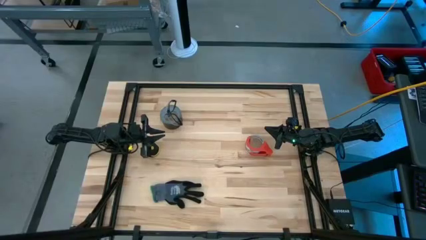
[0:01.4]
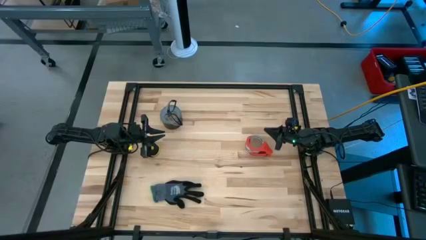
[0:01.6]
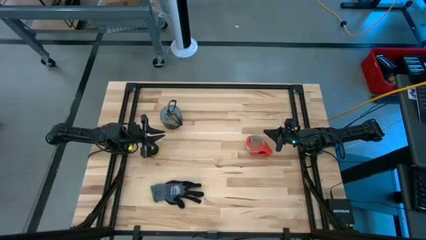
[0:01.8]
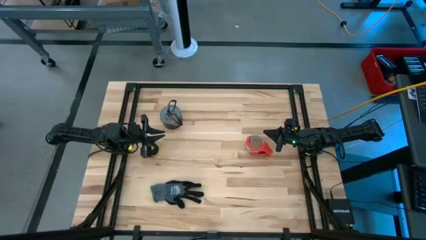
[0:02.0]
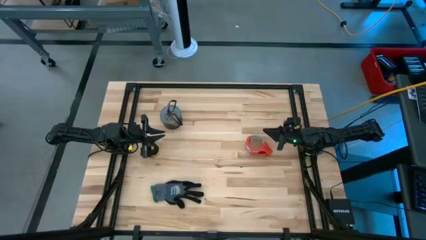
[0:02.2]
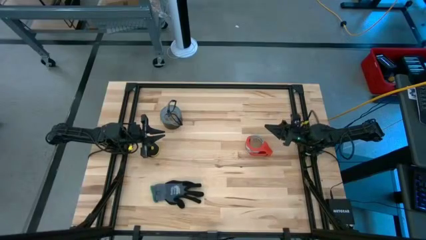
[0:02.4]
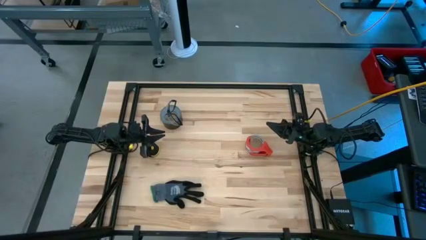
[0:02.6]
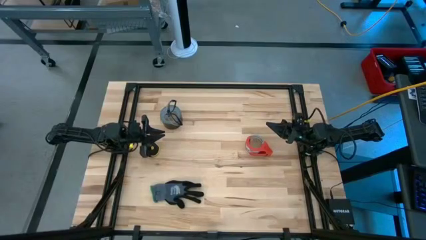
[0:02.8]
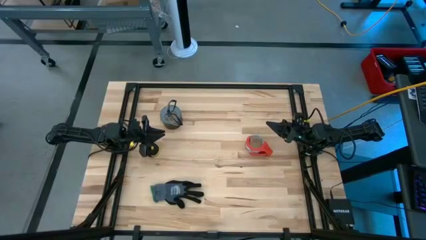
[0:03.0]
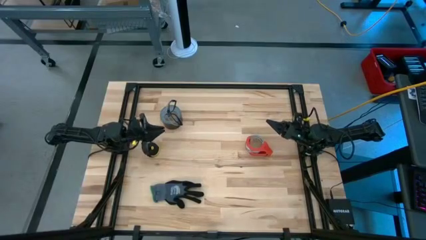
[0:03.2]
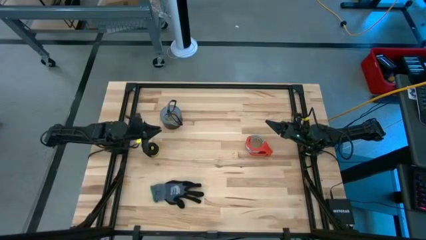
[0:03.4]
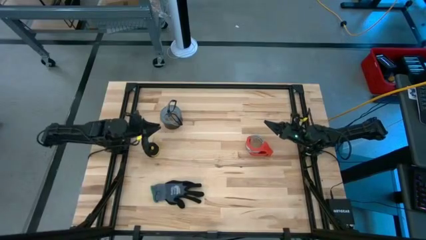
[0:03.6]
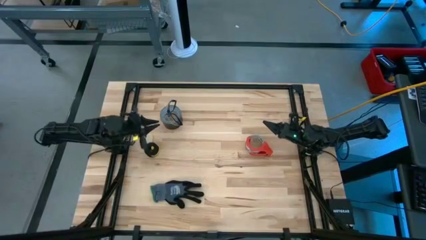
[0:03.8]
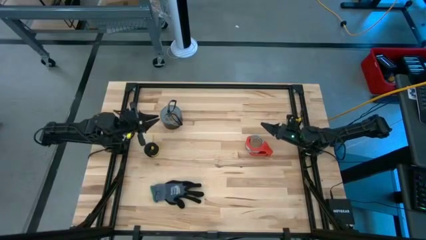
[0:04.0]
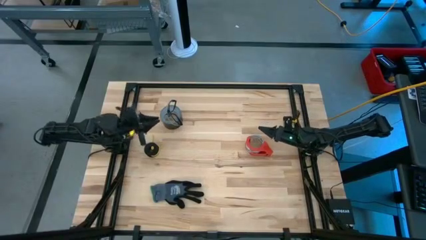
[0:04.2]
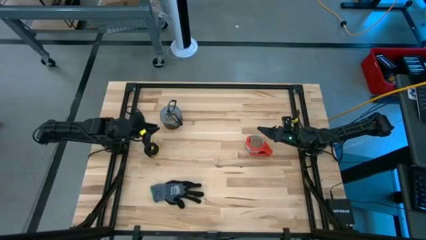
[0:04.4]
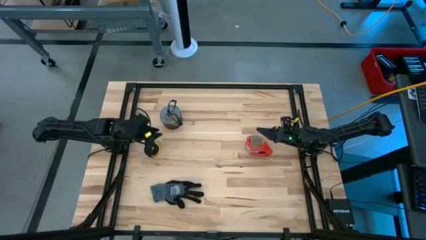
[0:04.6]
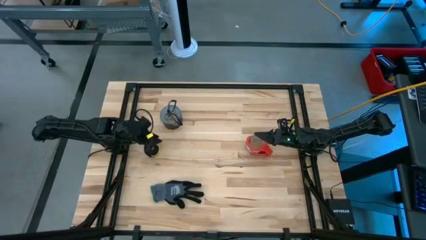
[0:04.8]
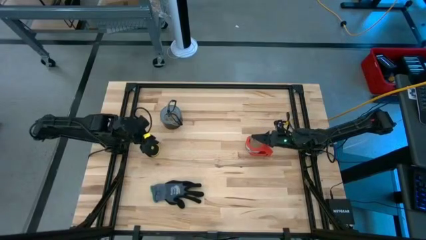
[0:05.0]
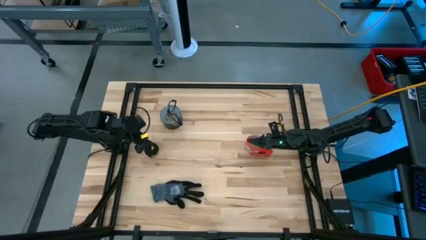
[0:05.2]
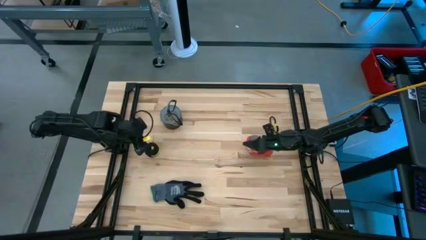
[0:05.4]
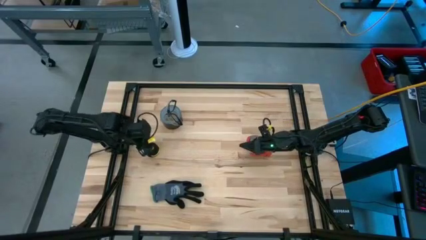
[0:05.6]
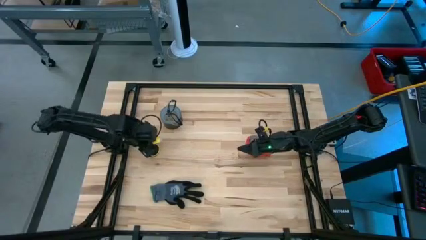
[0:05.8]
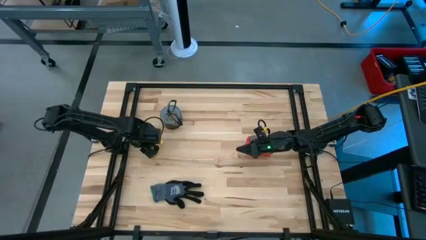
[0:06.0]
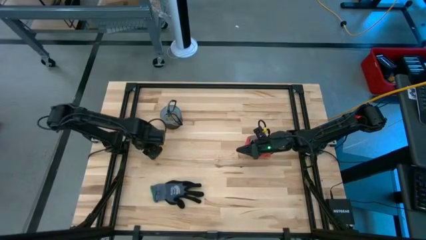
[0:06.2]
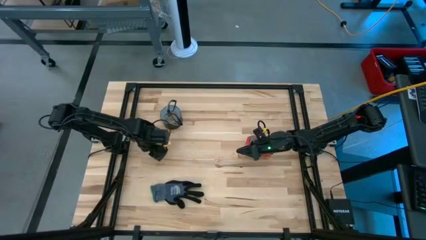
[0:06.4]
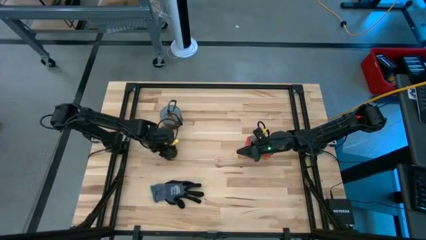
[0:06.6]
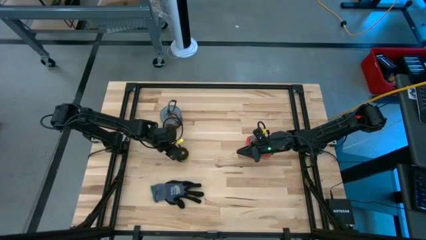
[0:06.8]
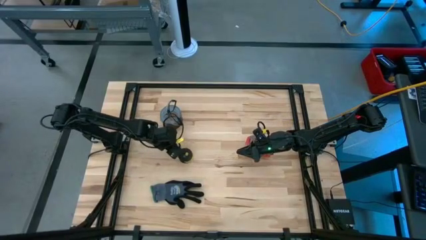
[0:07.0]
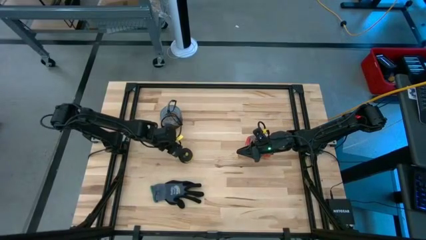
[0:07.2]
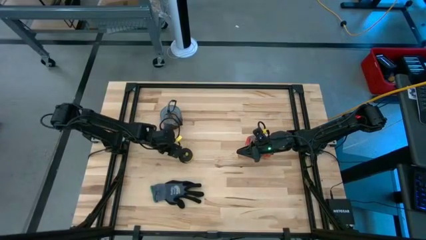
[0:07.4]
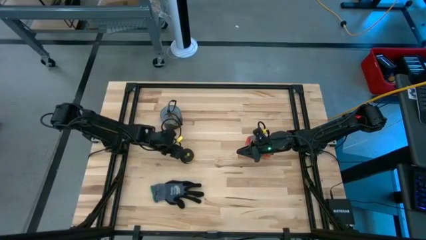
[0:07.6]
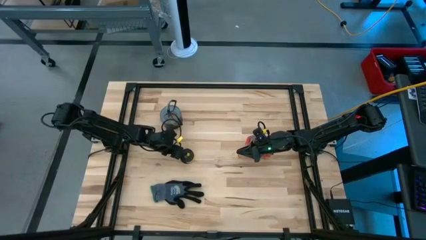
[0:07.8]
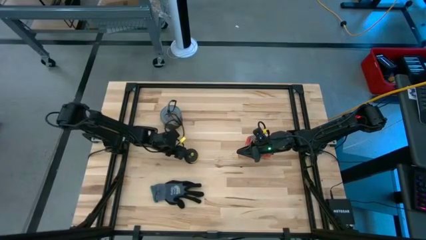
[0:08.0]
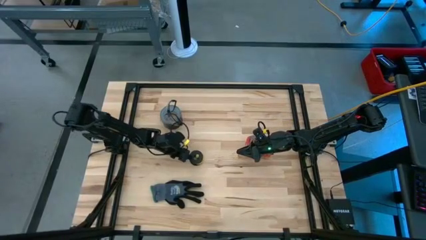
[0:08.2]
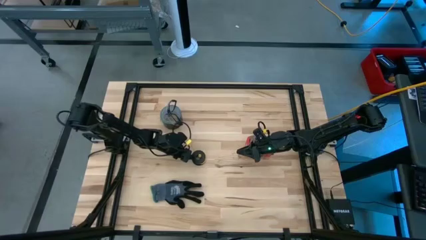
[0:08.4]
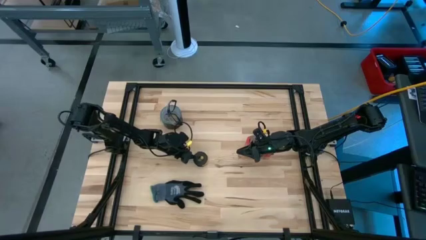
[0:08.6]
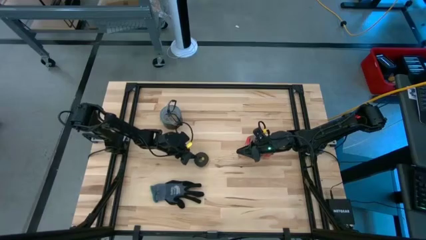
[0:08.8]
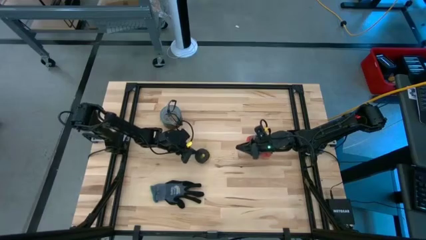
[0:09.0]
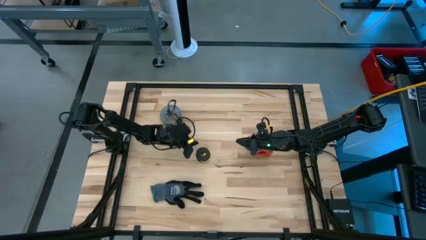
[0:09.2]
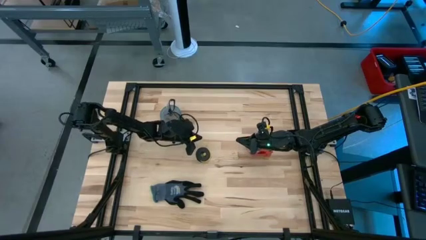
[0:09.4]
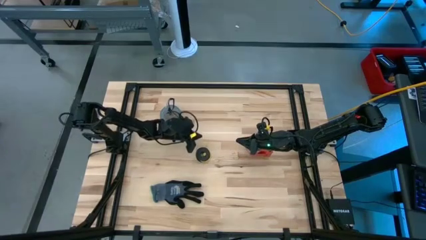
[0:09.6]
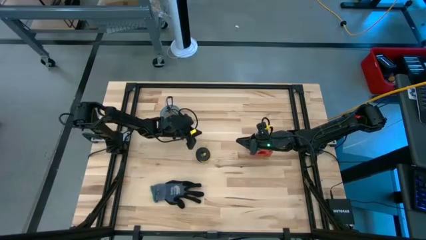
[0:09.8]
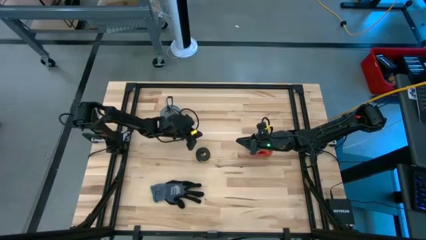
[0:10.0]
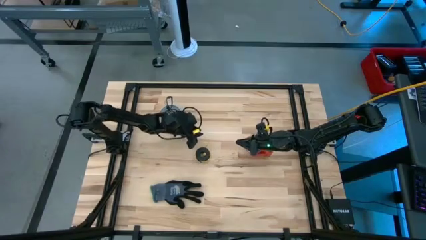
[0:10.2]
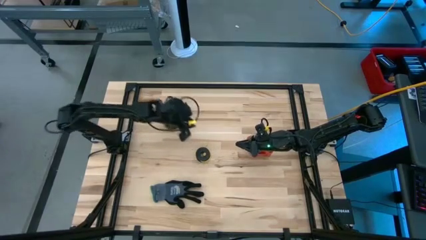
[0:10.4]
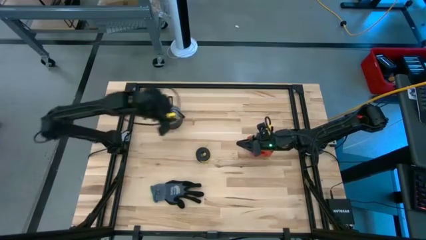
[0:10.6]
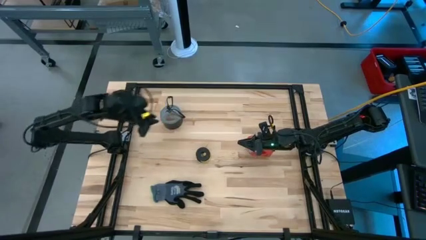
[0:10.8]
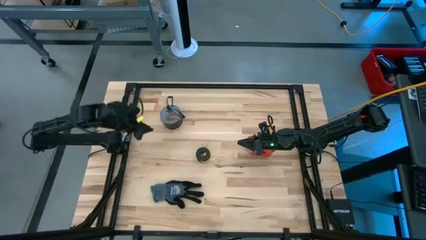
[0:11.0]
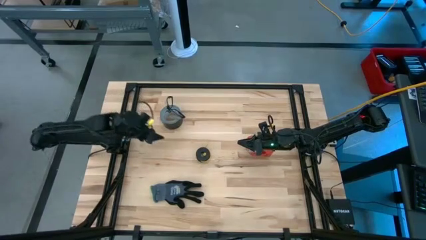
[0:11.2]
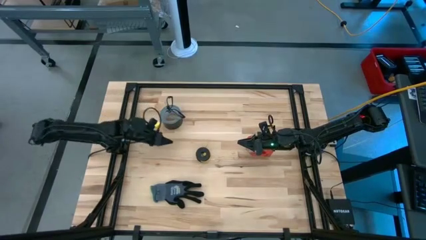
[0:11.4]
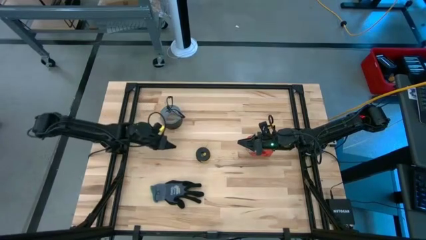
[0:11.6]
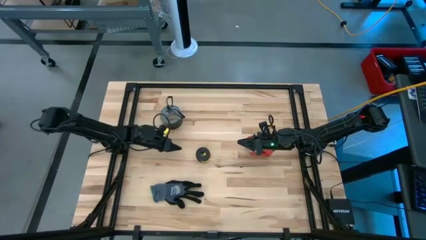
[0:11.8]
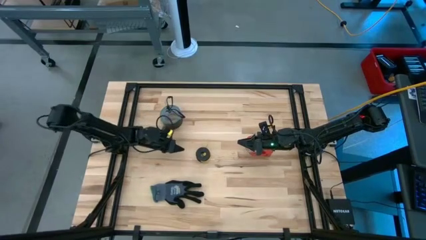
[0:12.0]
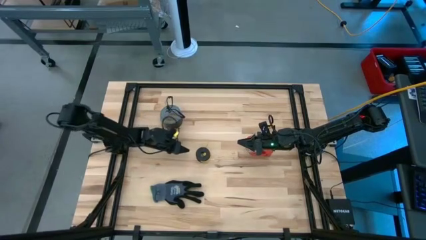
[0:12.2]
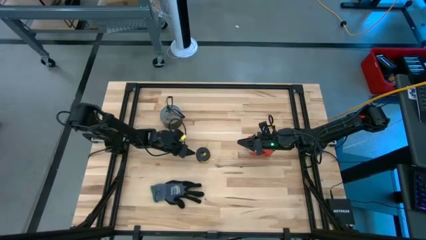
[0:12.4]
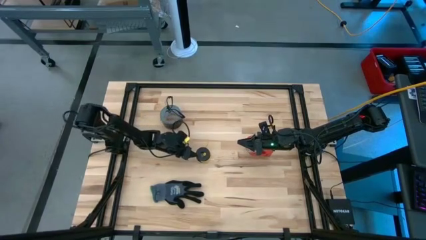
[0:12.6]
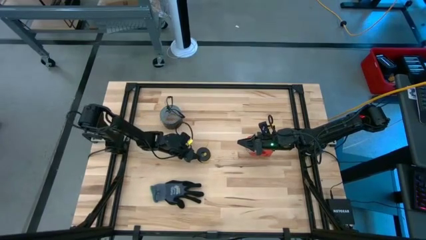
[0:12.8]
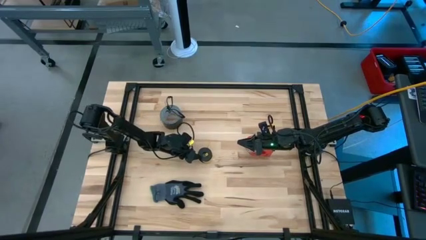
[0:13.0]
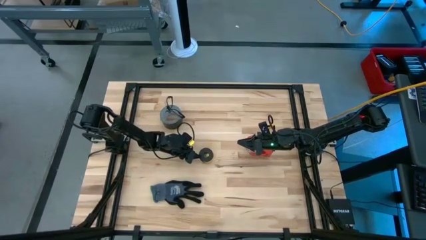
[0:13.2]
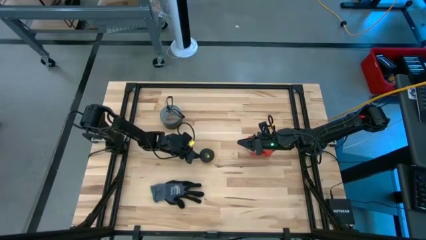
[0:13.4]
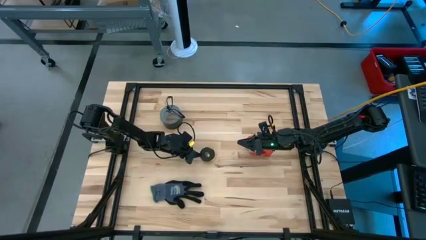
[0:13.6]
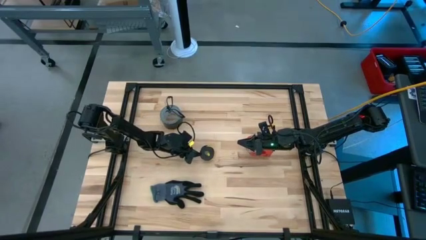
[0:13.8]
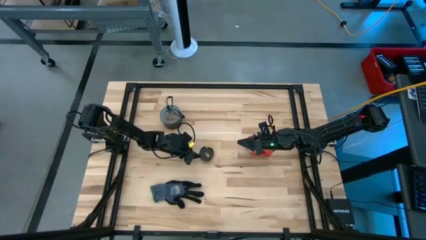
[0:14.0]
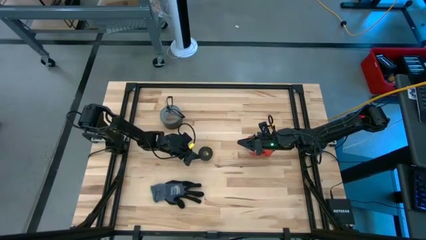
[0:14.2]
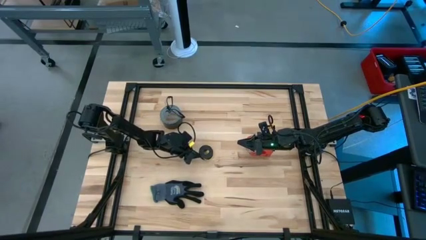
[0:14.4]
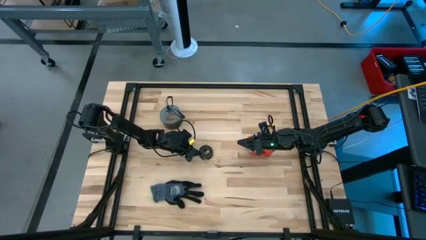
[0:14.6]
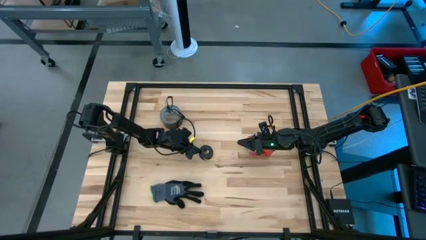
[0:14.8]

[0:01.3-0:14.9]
Task: Coil cords
Uncoil the yellow wire from the spool
